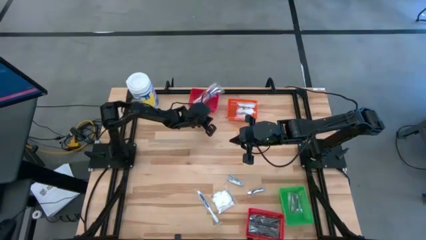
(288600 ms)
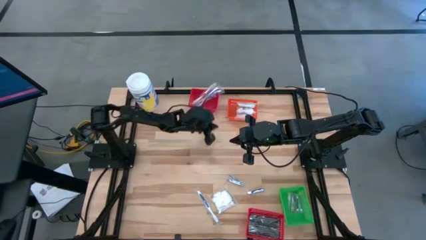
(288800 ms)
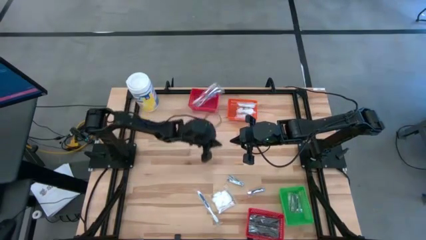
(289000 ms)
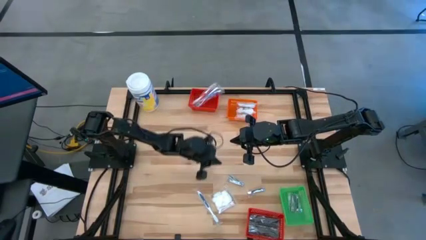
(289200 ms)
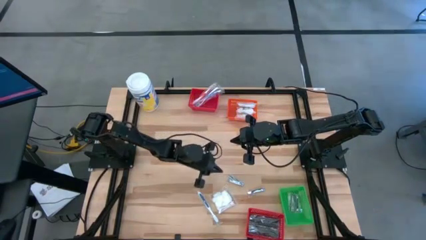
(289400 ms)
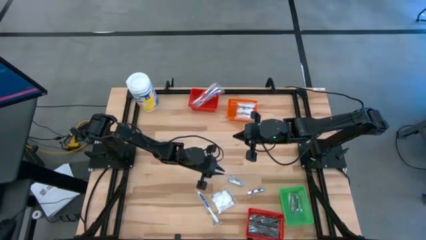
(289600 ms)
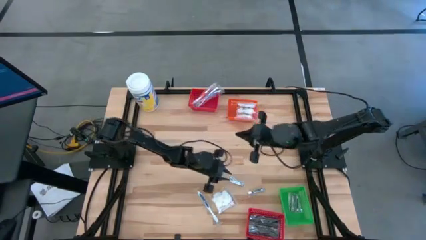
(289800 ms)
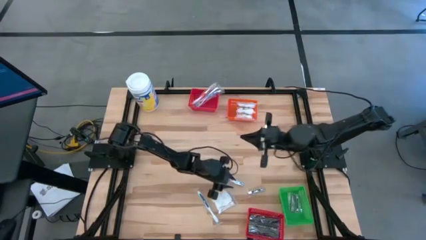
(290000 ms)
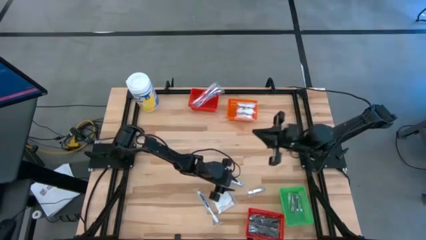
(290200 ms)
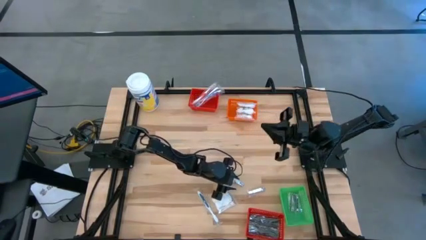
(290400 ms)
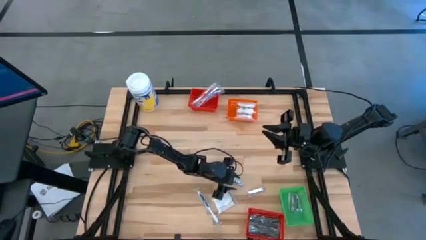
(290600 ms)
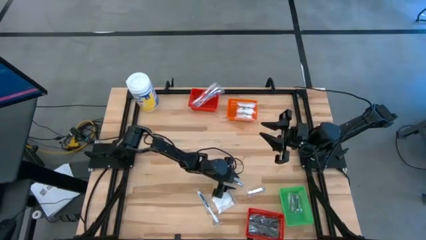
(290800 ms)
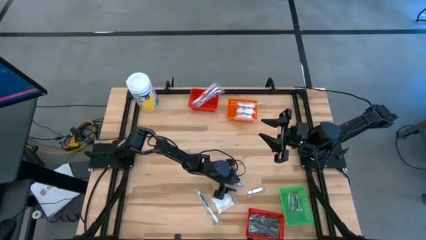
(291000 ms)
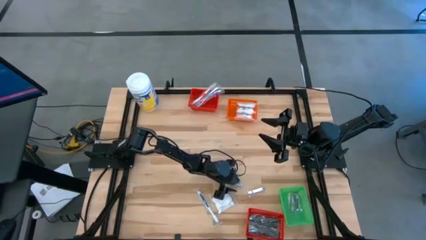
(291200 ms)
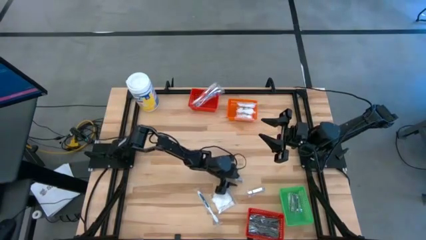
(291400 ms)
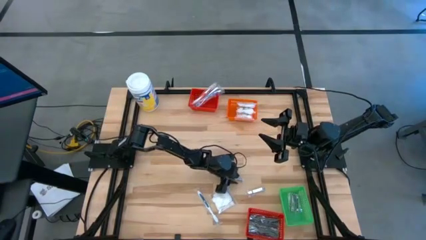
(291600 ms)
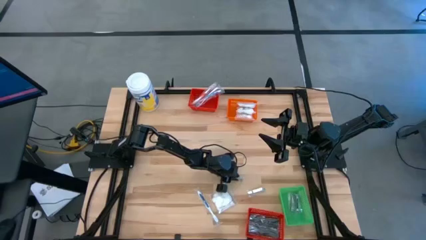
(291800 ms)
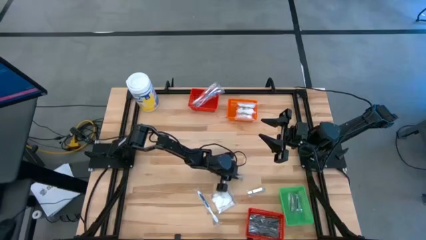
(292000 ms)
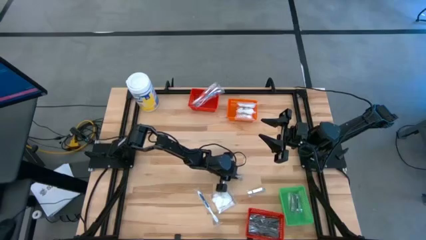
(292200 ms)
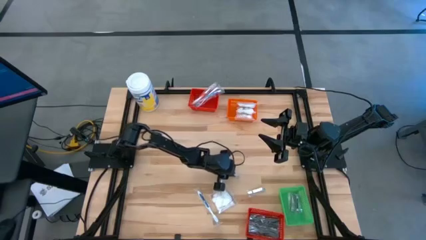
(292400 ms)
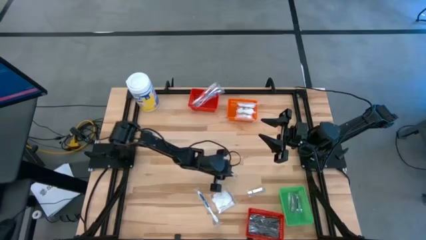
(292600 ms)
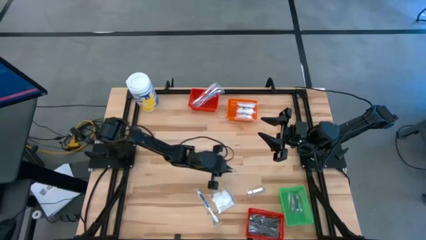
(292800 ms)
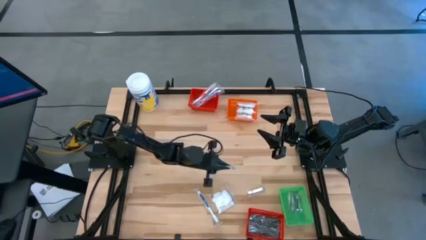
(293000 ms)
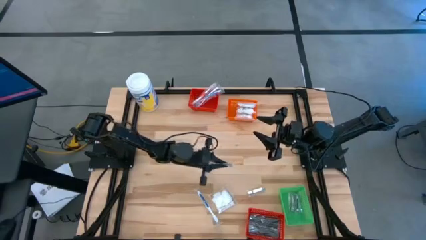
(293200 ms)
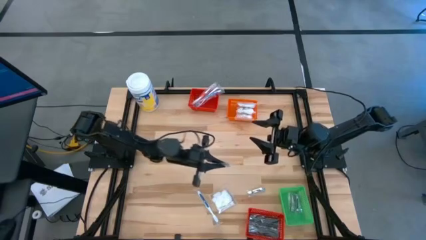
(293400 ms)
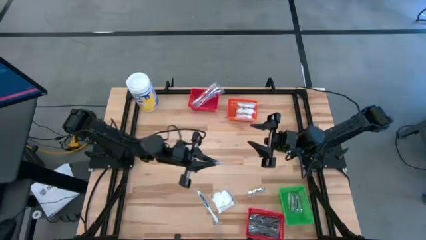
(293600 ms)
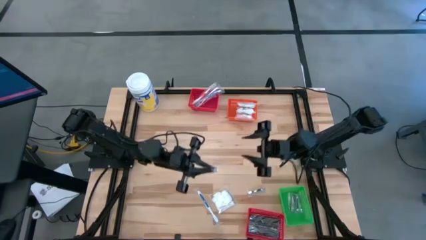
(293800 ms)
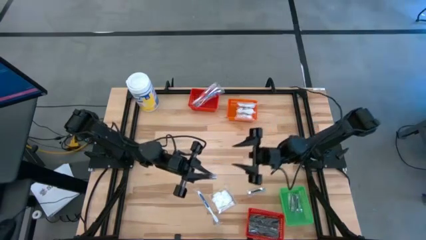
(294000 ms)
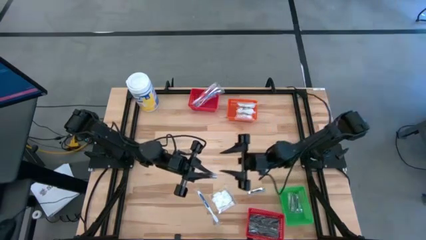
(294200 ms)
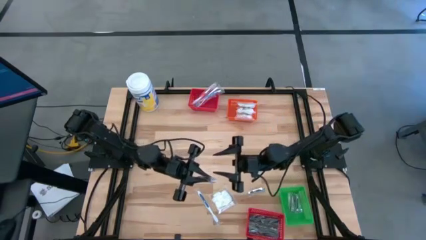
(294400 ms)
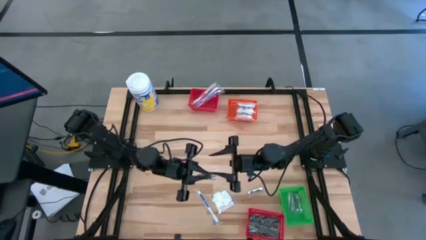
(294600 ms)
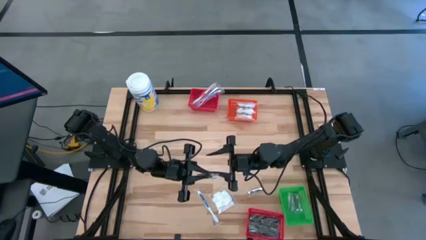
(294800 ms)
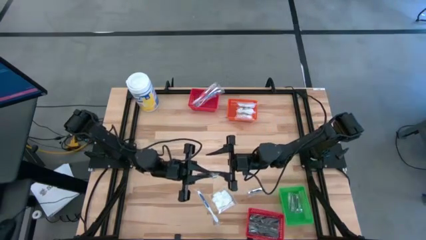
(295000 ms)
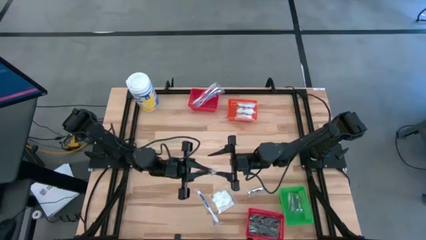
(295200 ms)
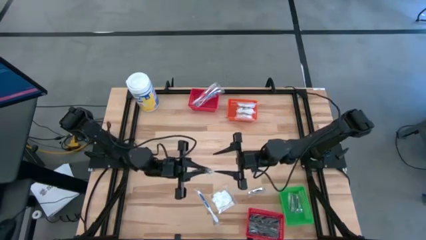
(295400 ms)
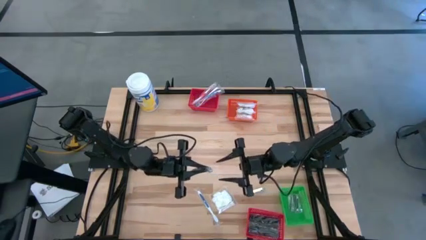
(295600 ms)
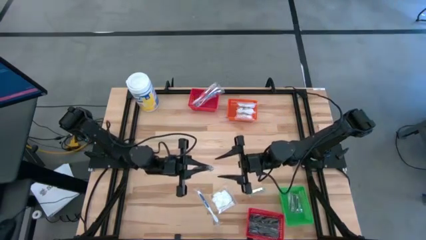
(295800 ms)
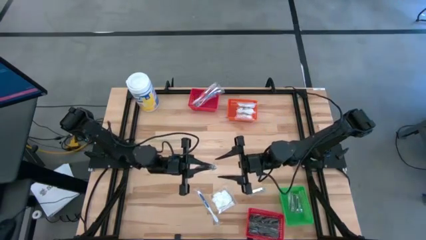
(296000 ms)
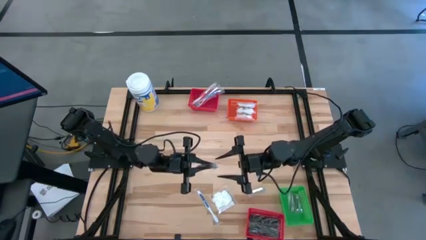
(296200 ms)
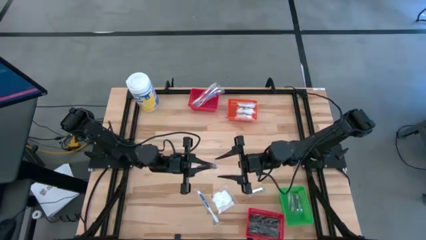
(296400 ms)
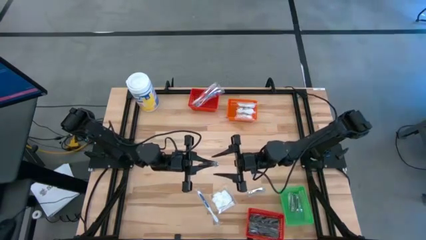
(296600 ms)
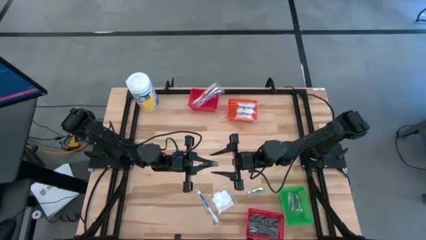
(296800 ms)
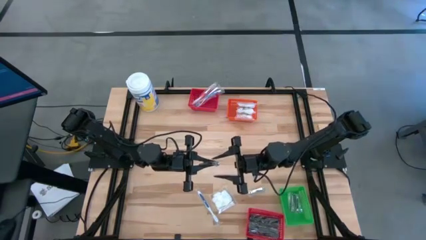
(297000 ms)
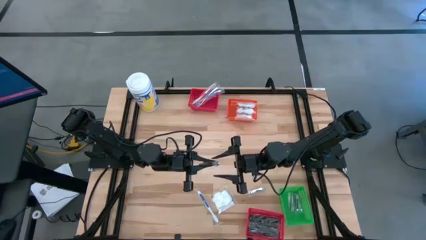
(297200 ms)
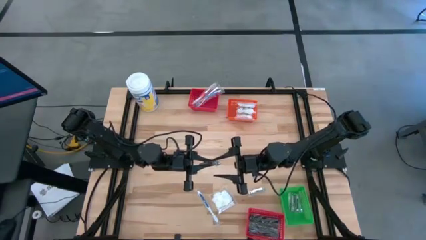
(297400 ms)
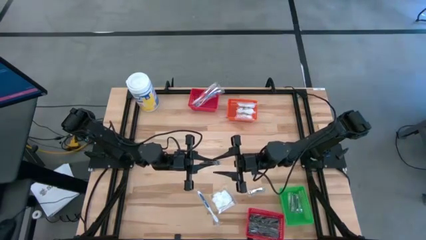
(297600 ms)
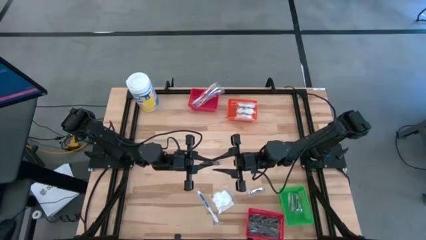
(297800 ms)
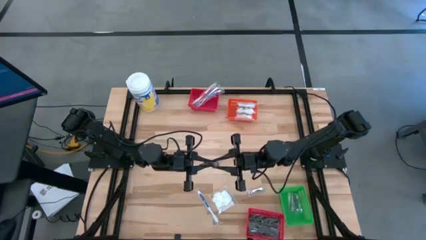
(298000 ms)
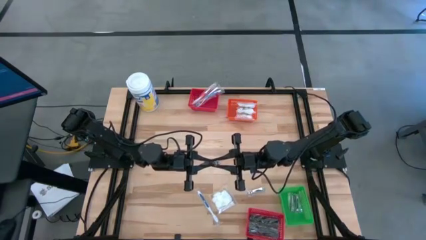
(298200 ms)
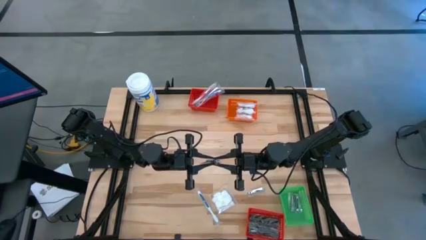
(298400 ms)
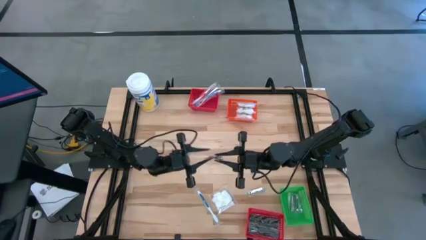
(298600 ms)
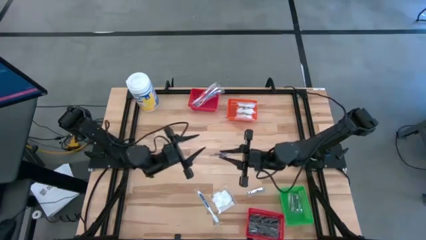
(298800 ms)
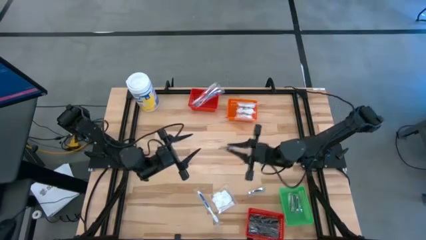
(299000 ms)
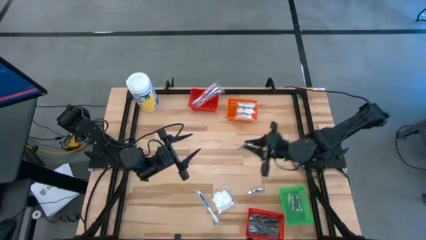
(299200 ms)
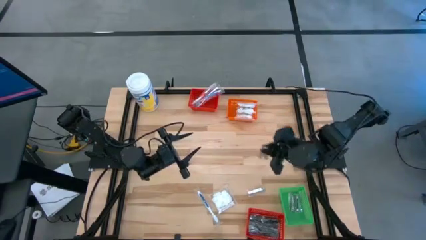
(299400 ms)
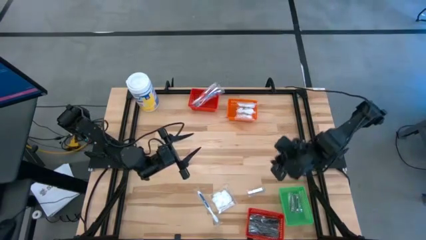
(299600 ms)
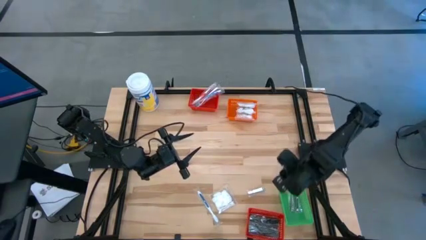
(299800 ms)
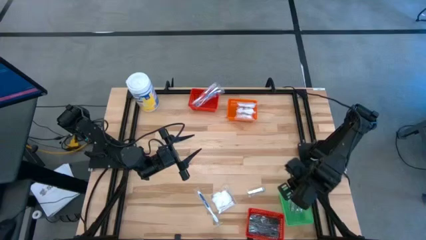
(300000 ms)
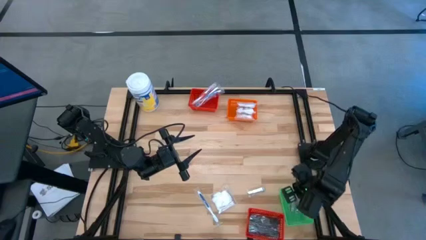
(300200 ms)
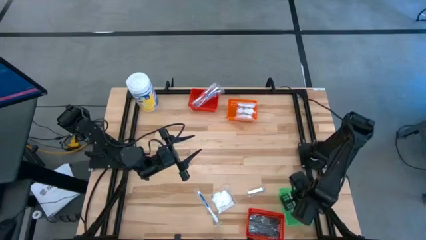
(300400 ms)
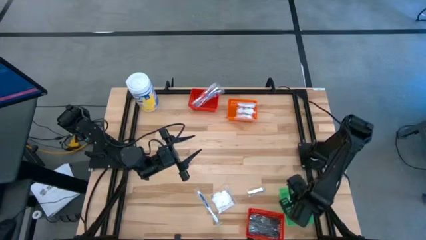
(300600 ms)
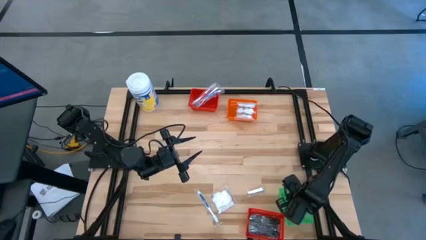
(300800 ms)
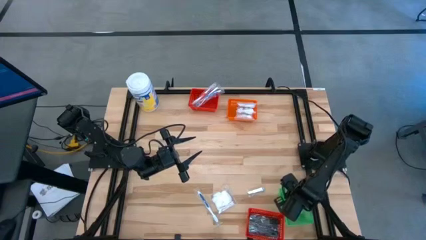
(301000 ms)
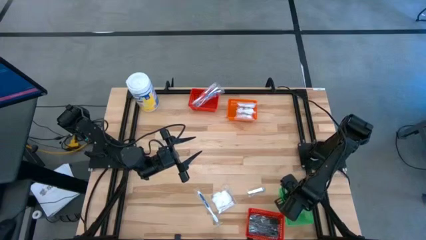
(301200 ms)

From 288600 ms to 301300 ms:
Task: Pick & Place Travel size toiletries
Put the silver nail cutter into the green bin

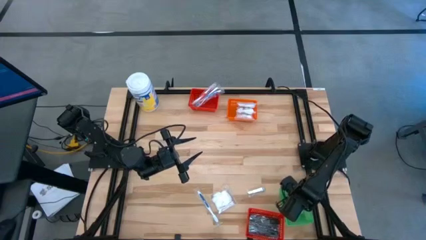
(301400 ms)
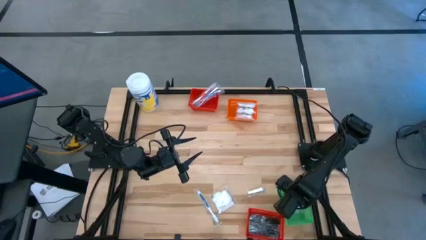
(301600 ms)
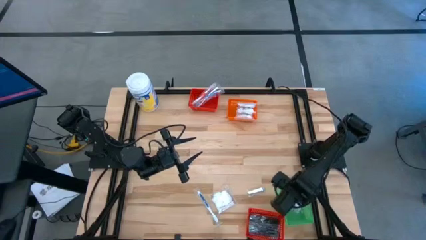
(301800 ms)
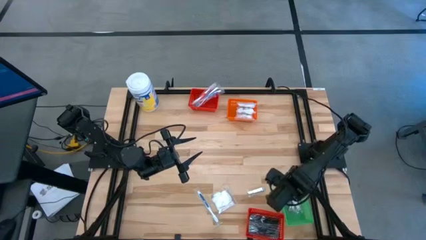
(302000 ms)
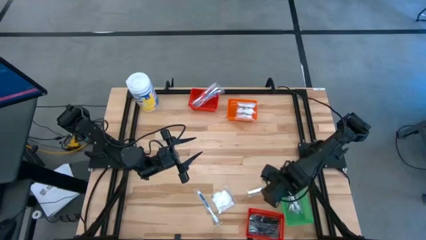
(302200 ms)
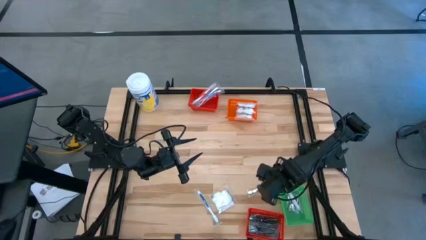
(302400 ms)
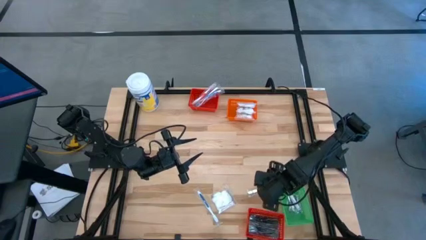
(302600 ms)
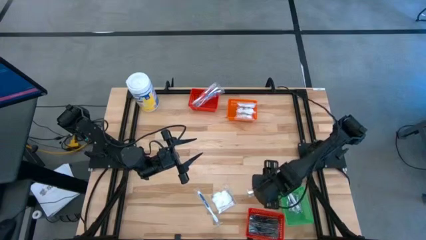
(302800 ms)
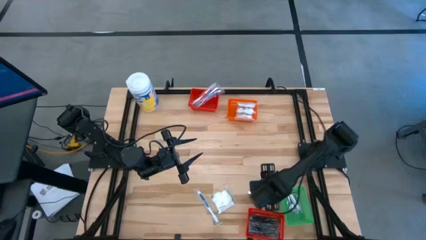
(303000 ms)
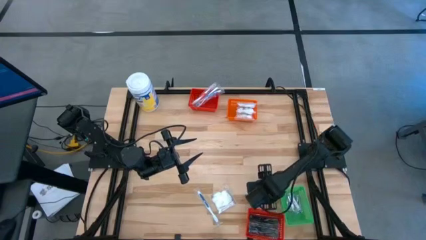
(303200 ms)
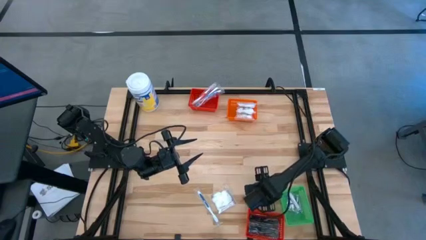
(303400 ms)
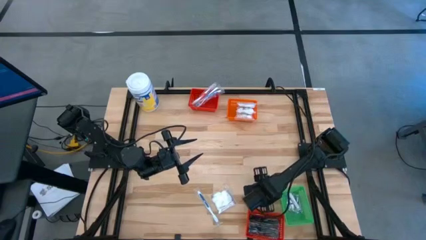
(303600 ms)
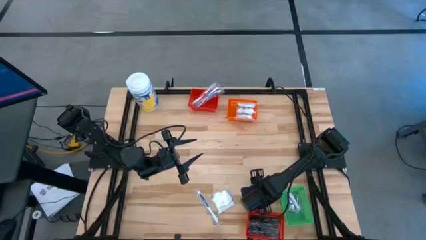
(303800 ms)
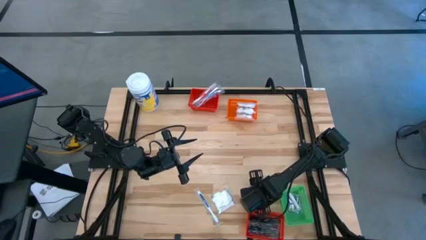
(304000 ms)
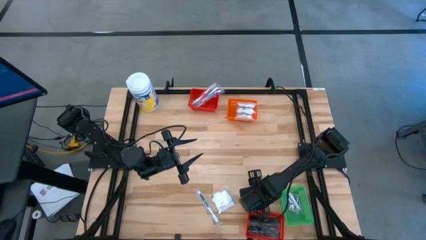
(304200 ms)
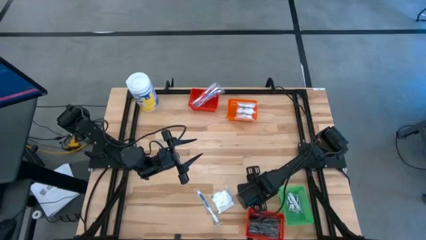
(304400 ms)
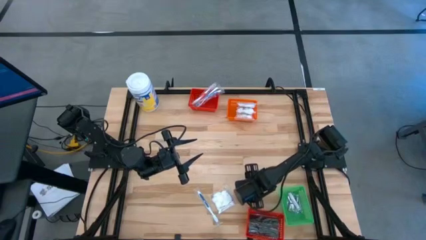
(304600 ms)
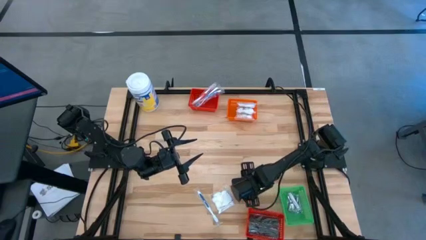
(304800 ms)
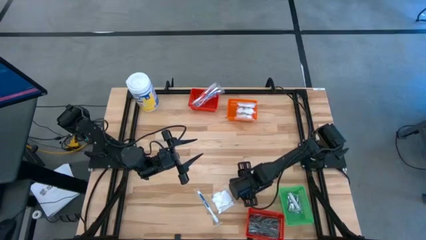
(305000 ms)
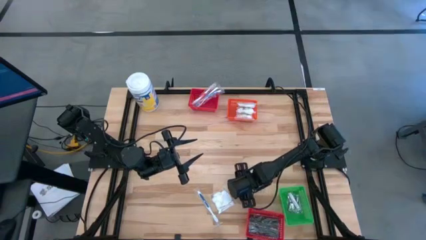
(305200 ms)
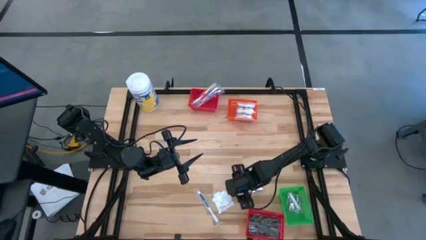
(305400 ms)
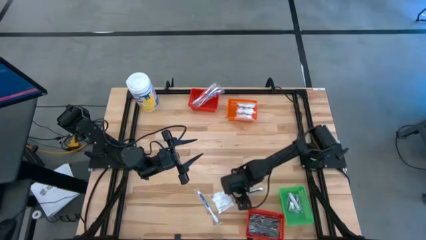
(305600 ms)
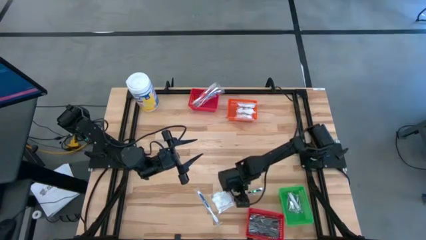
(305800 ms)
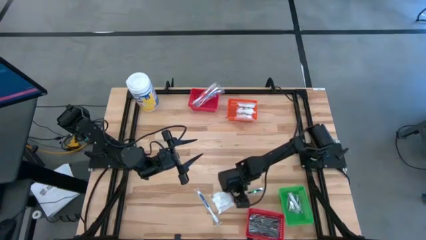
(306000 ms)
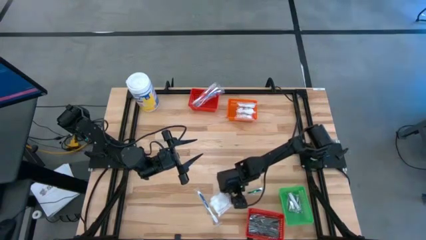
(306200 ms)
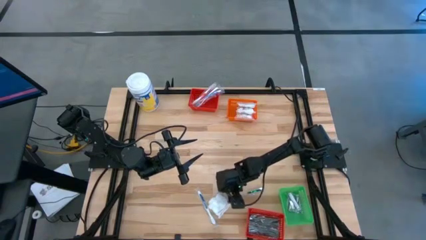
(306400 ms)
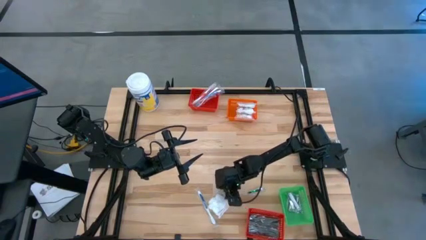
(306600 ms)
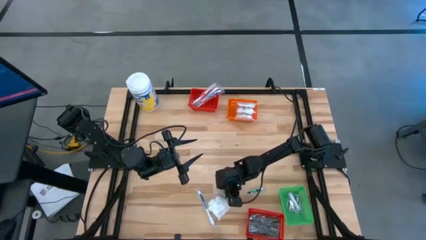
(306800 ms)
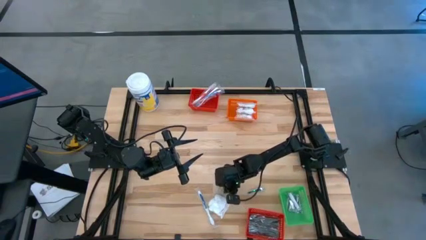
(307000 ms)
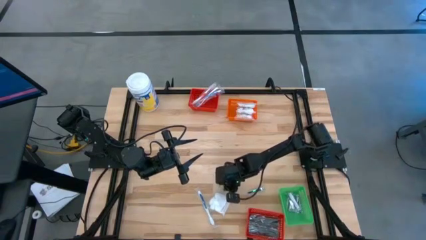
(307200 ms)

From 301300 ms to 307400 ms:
Put the white cotton pack into the orange bin
